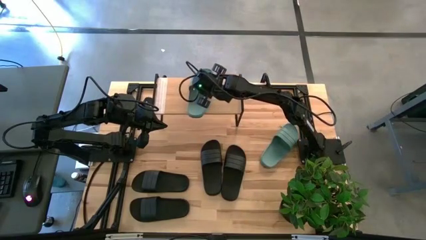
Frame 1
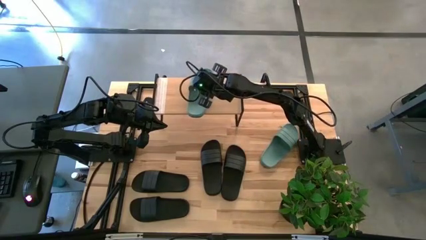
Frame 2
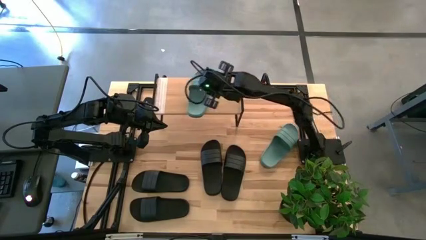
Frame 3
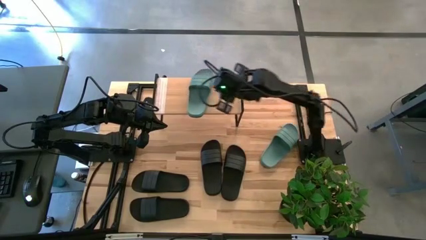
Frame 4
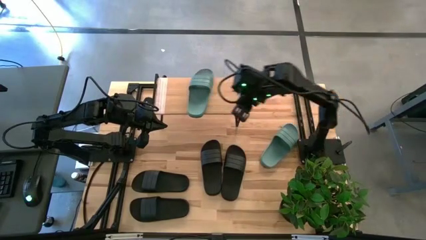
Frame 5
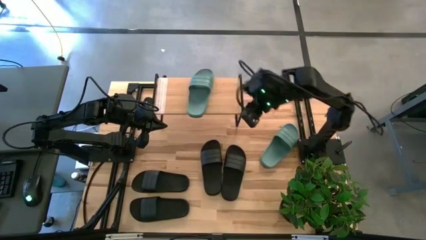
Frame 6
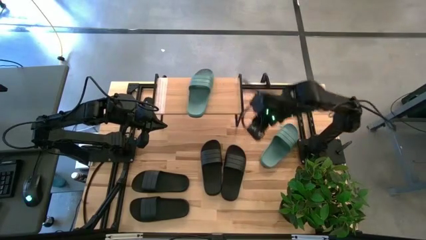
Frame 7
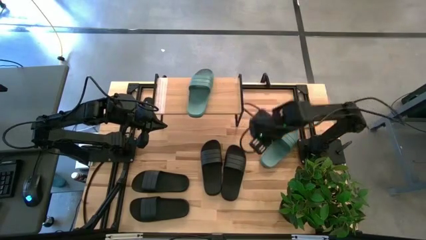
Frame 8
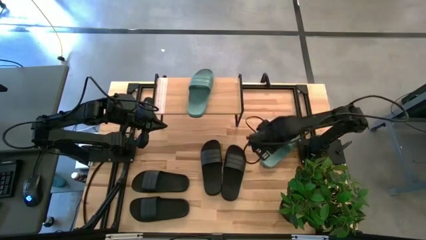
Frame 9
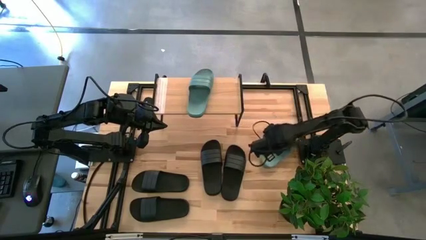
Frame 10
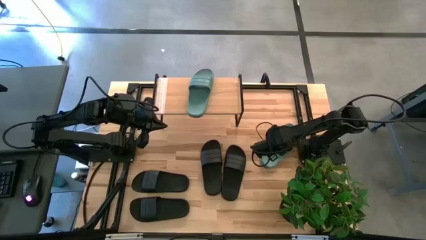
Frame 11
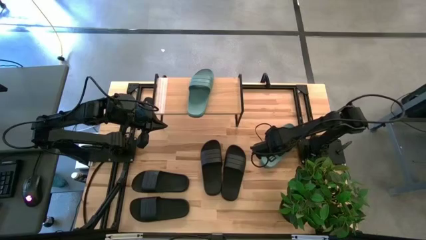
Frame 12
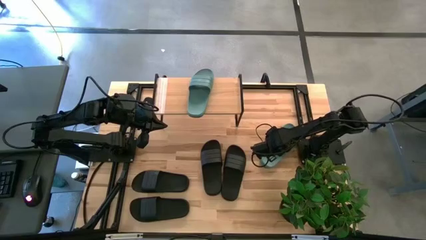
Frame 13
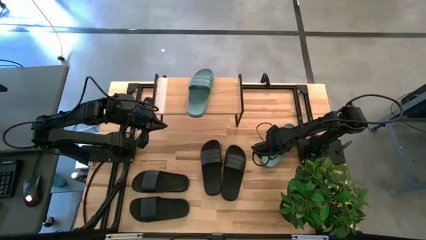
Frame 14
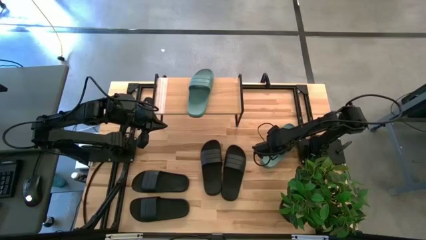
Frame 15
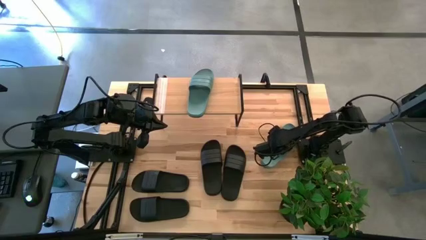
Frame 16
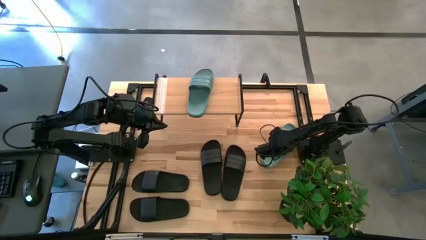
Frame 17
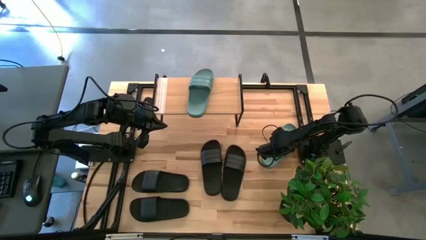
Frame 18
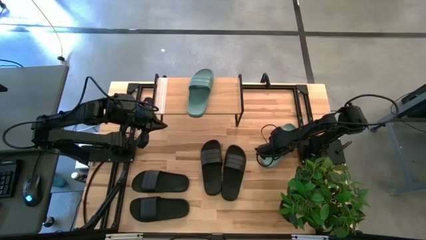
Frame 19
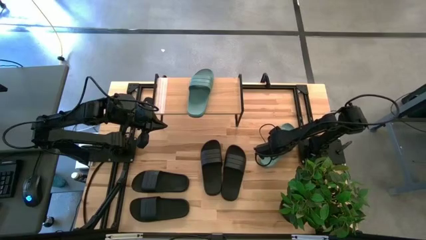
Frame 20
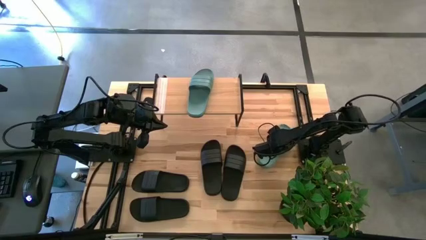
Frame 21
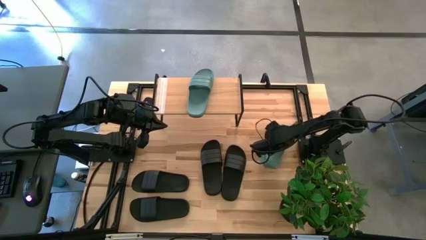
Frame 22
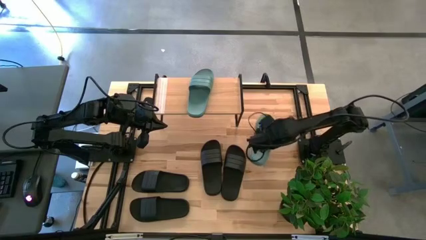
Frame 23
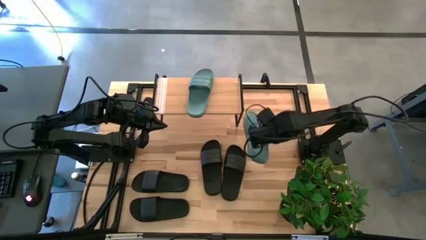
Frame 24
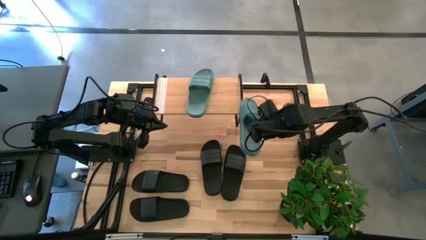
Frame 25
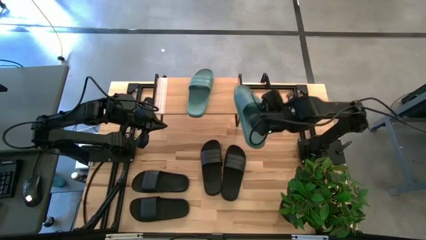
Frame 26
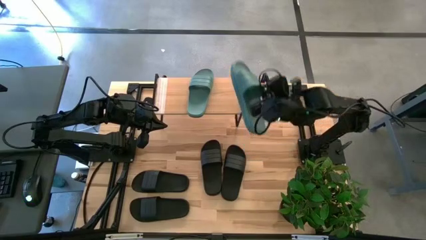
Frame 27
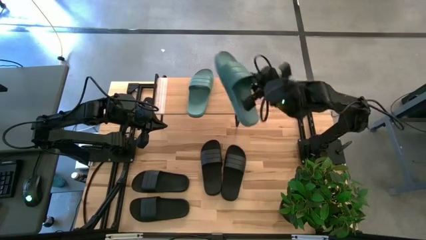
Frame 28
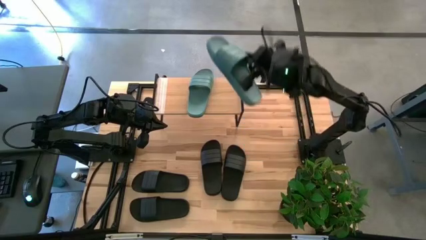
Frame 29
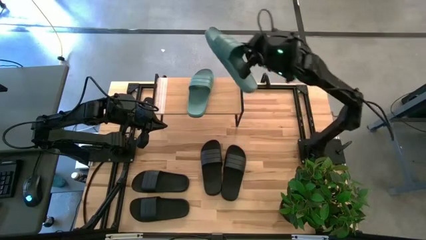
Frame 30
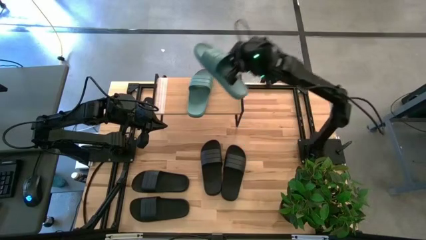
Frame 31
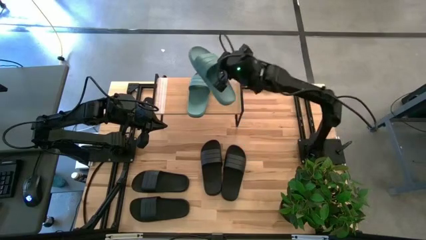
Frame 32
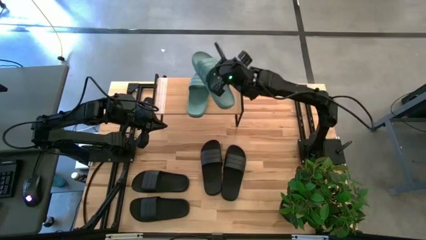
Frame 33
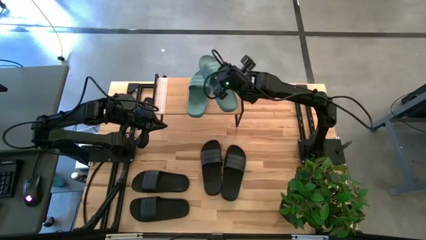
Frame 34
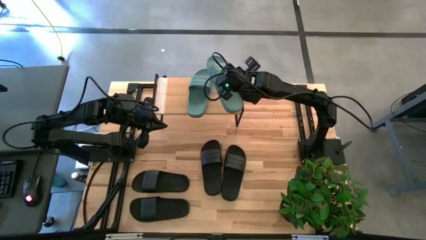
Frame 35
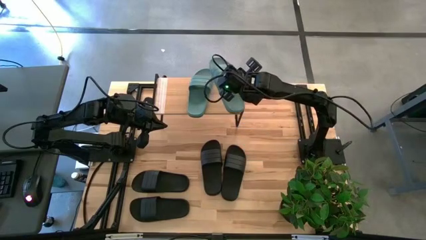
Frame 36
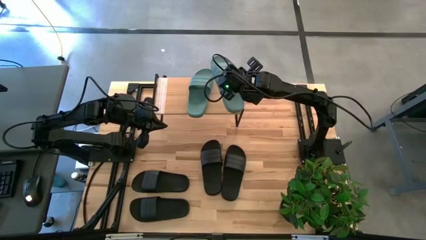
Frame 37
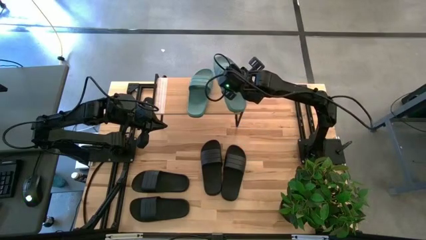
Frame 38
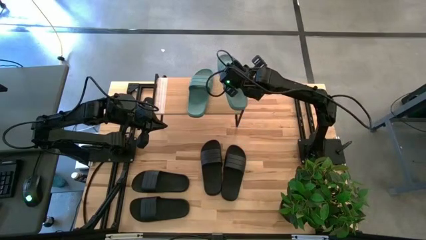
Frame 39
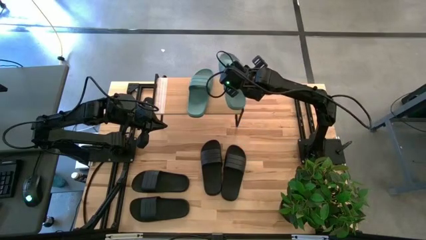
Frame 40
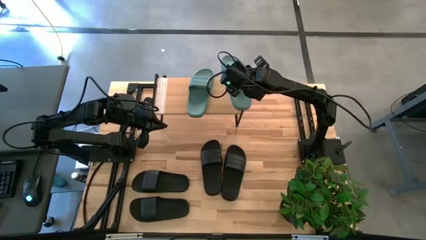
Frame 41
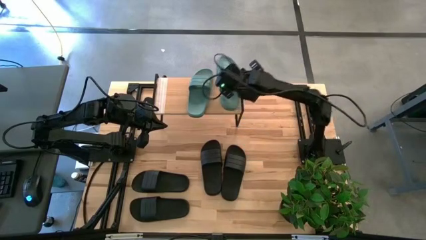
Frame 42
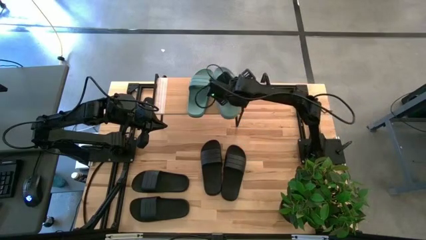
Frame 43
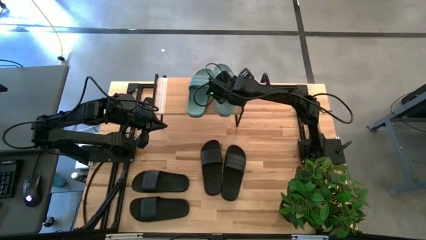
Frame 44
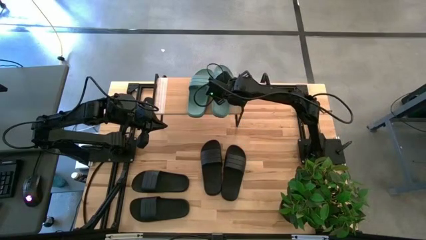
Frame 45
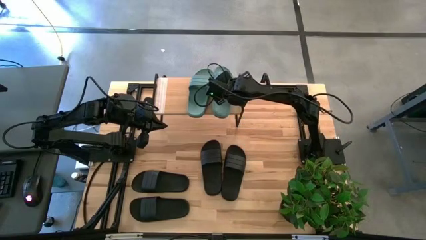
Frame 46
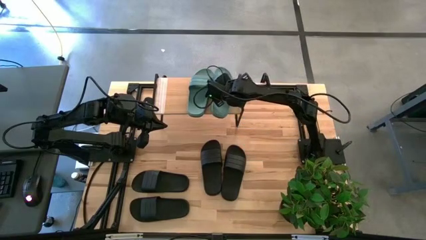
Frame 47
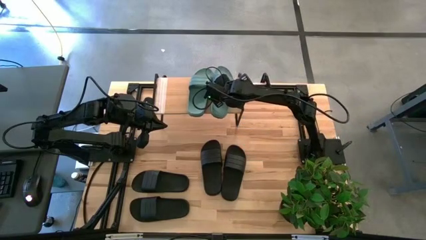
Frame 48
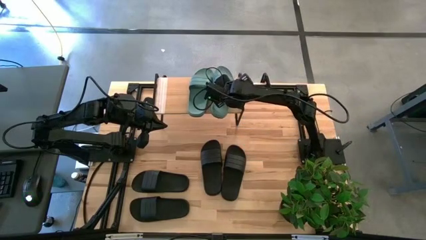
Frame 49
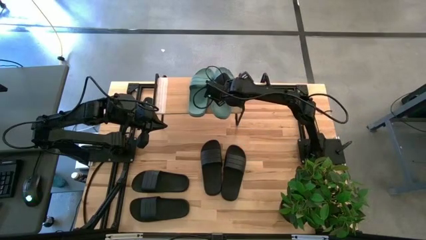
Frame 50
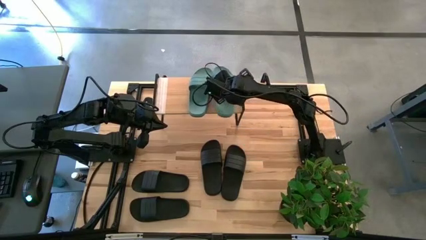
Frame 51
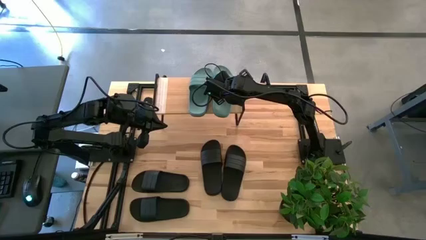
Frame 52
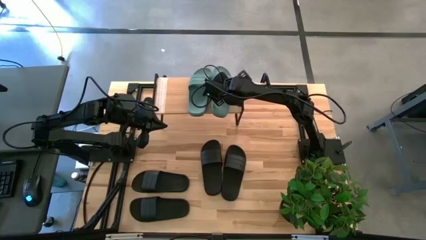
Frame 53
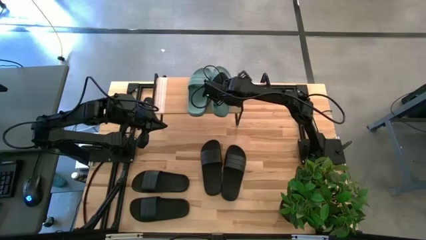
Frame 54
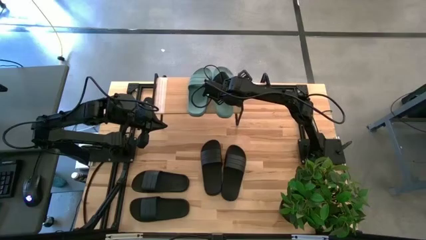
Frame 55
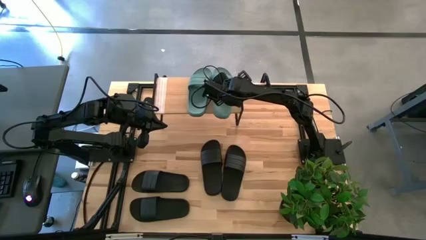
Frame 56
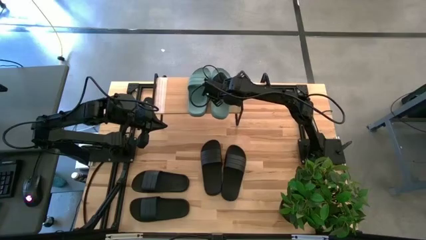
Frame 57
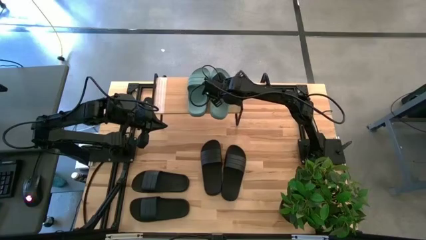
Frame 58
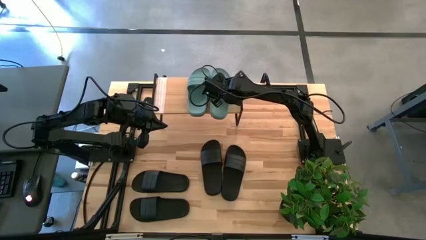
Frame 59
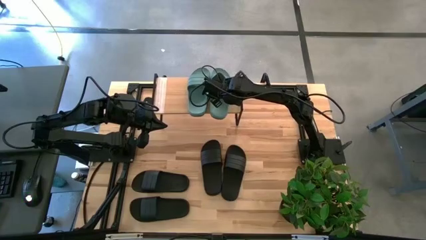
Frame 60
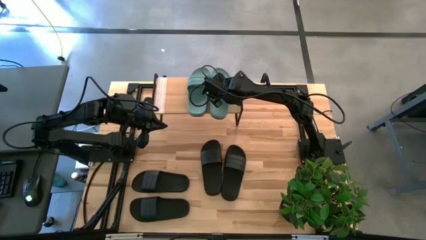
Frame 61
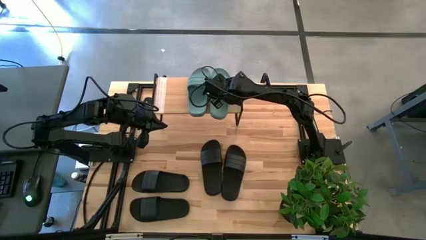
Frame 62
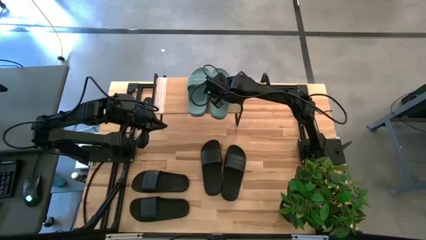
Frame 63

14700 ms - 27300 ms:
Task: Pick and place slides into the shelf
Put the green slide on the shelf

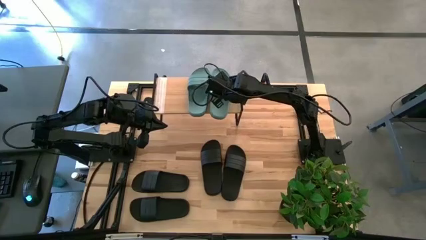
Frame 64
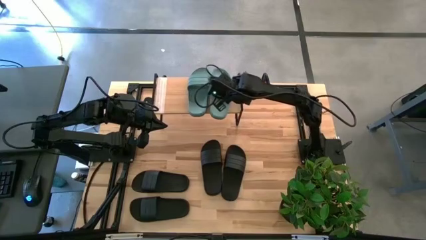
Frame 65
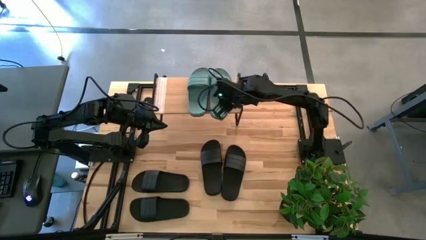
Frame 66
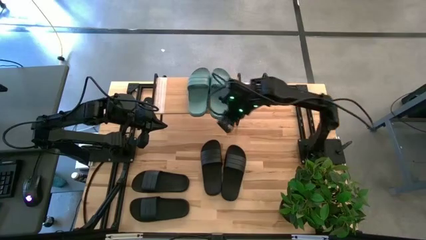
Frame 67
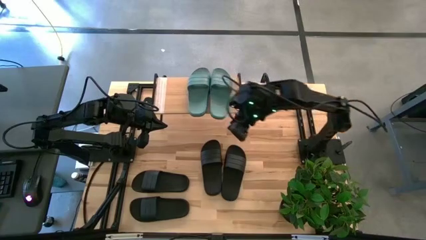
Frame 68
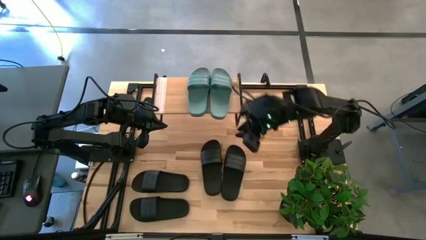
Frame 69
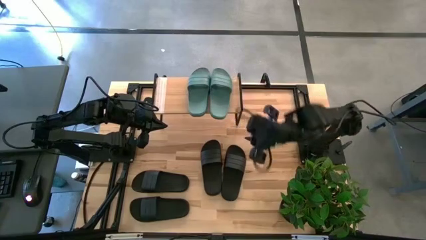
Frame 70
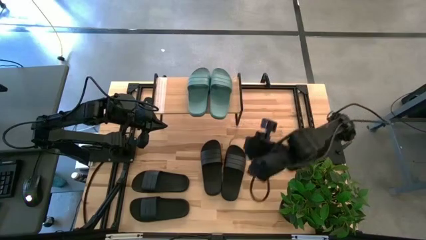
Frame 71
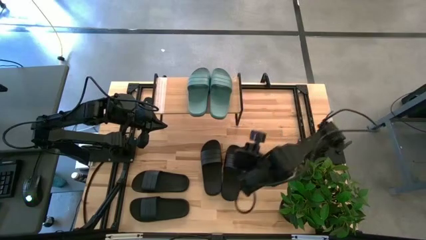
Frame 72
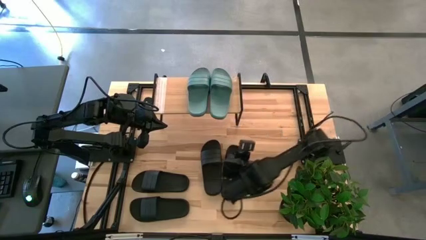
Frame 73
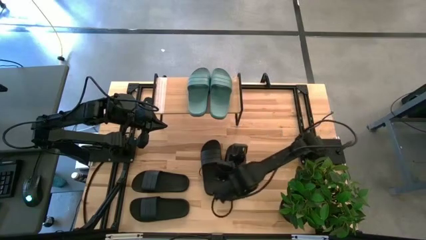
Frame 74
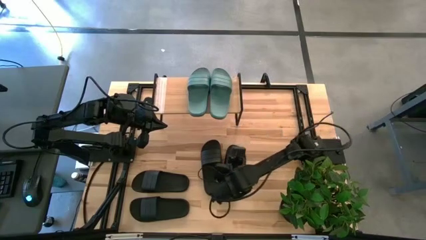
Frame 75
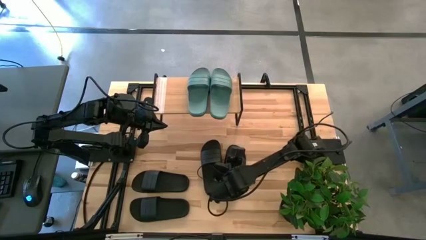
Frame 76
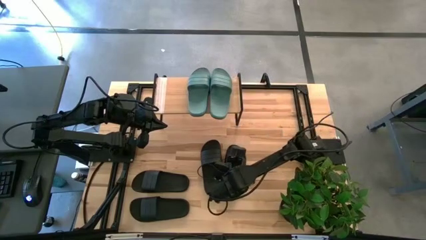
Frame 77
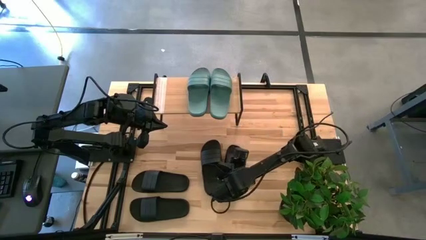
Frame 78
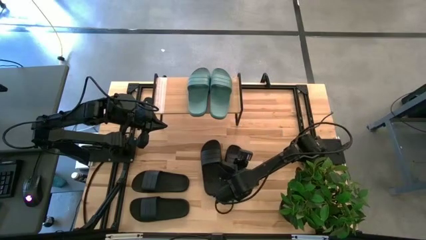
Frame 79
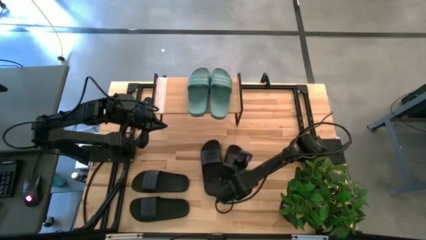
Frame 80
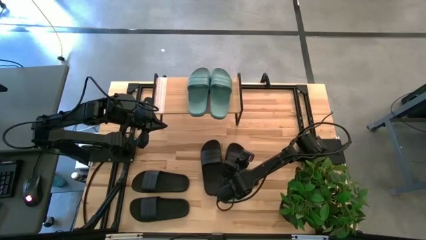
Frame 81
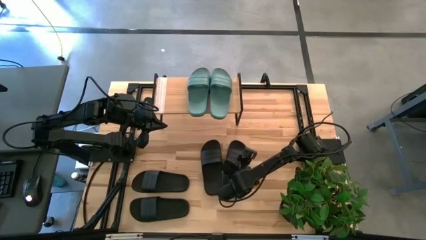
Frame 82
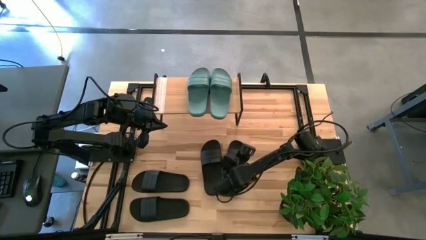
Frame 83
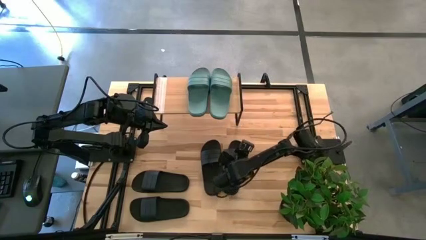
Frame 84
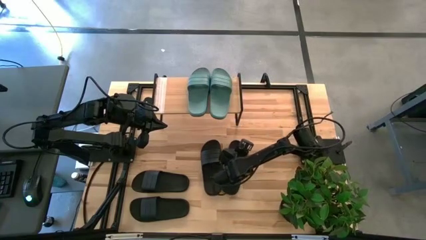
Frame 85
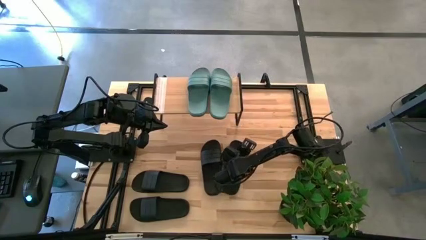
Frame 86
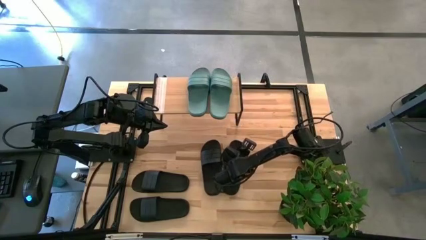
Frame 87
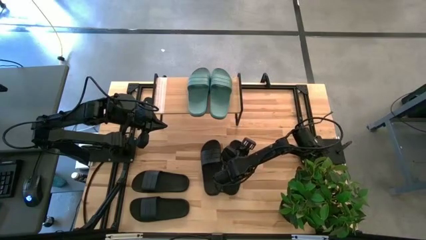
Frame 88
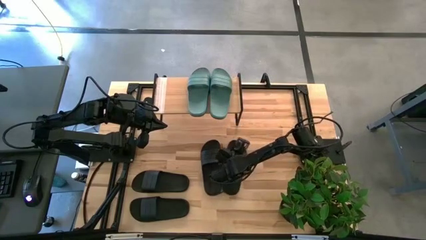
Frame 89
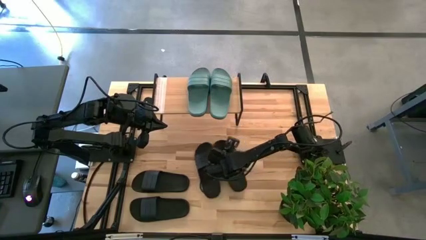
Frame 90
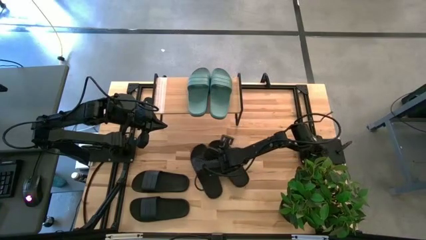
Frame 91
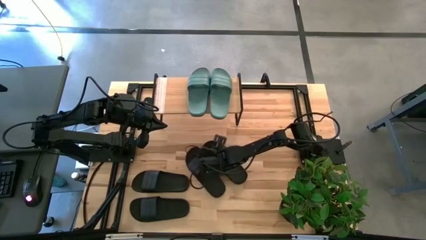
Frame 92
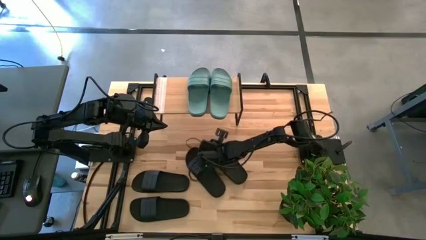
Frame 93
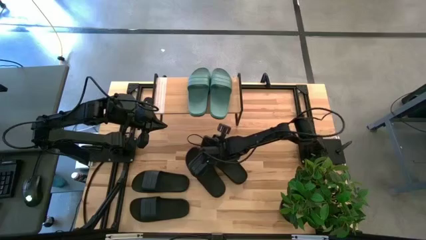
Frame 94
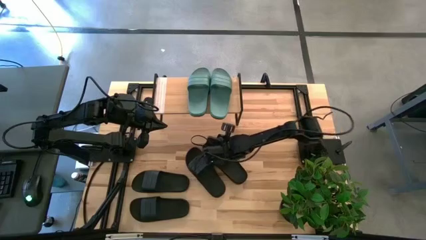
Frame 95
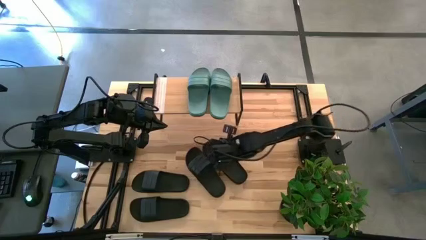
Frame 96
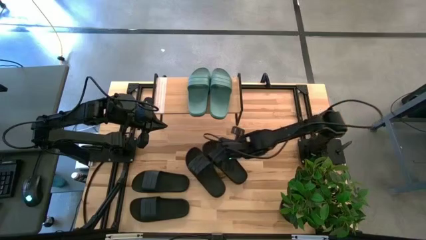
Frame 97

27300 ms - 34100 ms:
Put the black slide under the shelf
